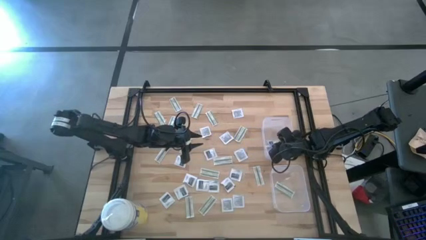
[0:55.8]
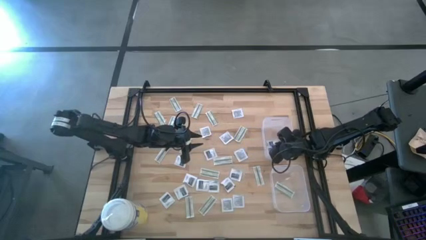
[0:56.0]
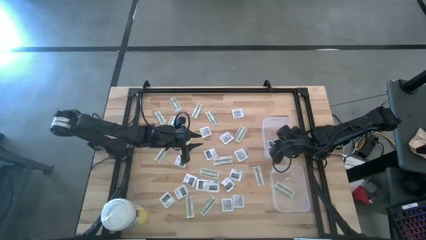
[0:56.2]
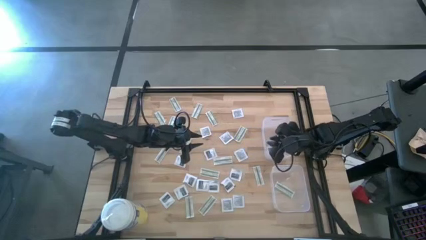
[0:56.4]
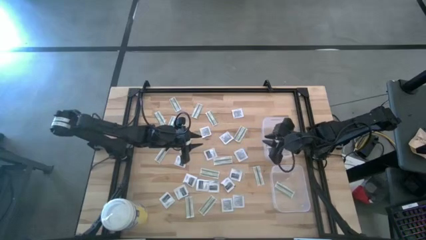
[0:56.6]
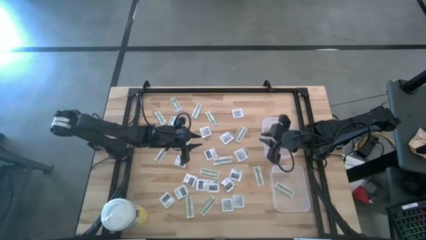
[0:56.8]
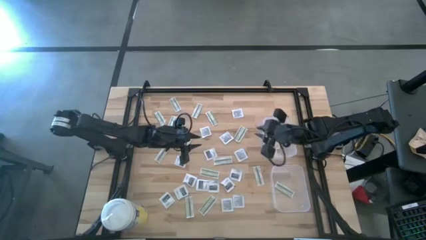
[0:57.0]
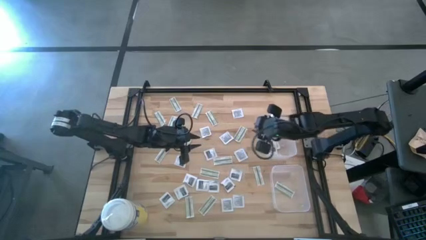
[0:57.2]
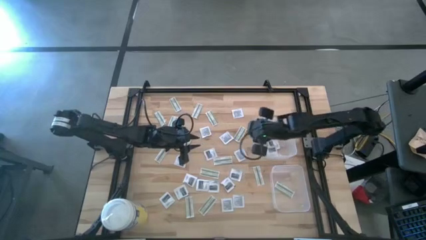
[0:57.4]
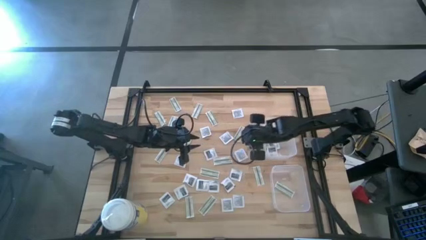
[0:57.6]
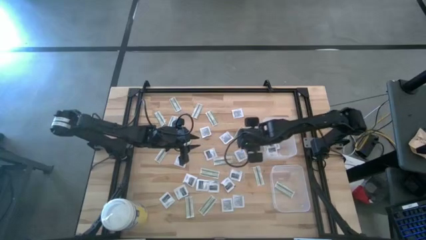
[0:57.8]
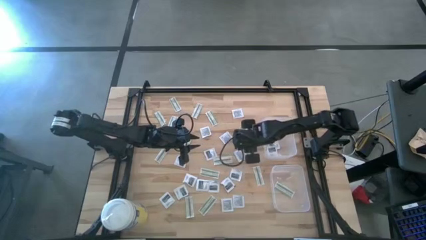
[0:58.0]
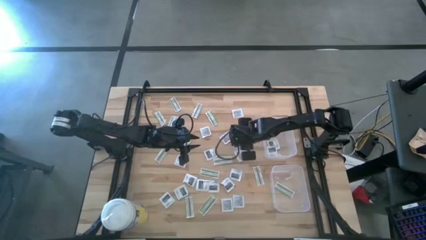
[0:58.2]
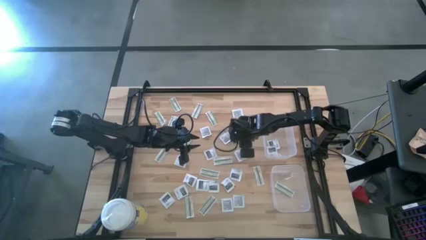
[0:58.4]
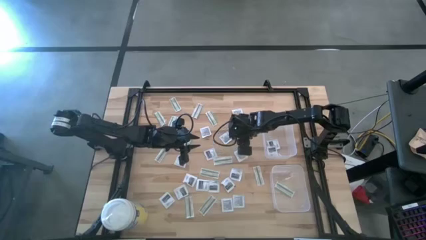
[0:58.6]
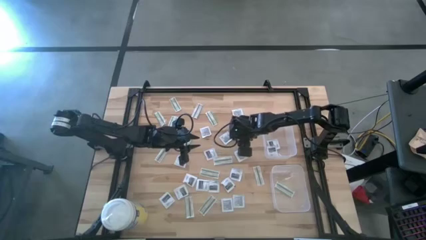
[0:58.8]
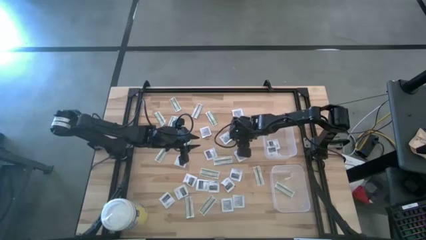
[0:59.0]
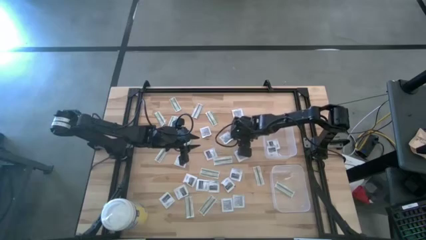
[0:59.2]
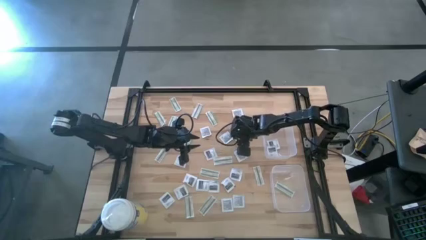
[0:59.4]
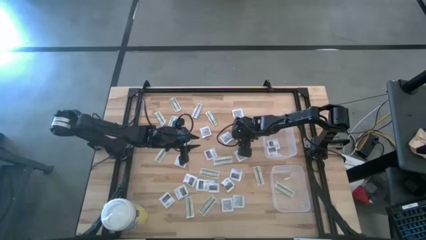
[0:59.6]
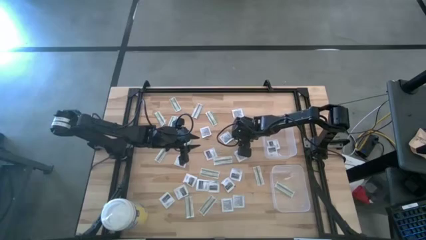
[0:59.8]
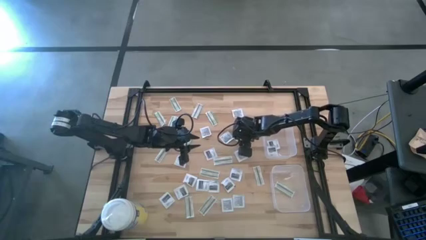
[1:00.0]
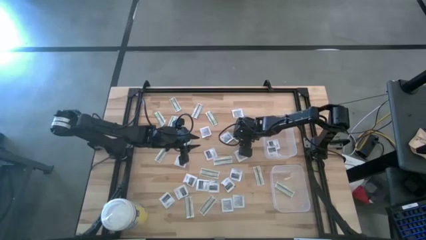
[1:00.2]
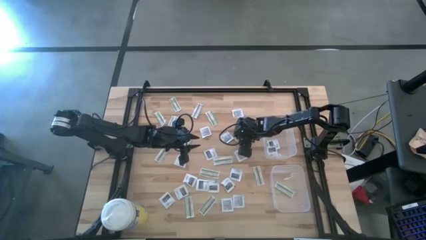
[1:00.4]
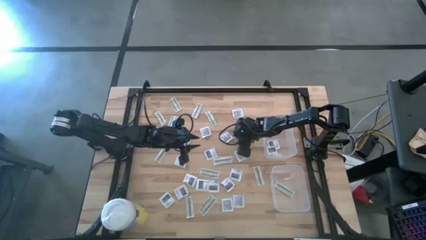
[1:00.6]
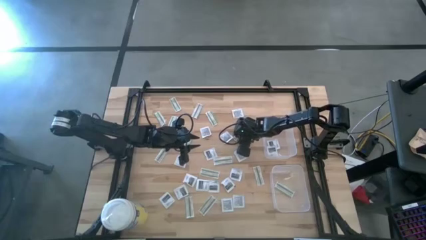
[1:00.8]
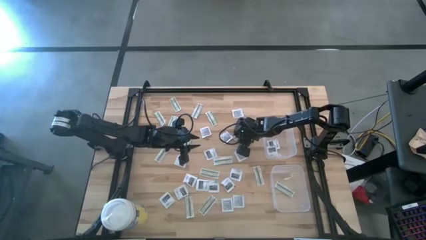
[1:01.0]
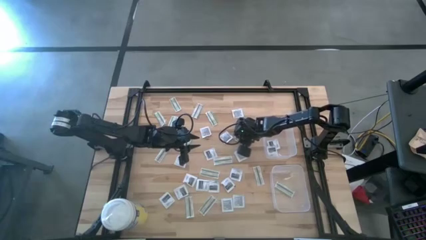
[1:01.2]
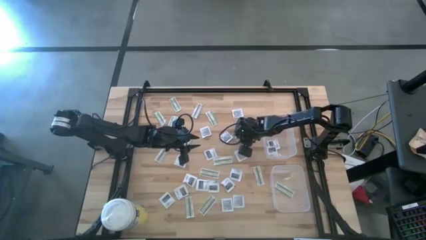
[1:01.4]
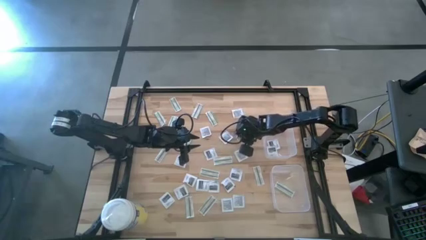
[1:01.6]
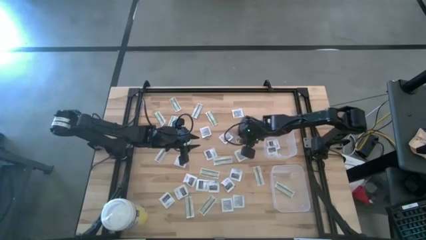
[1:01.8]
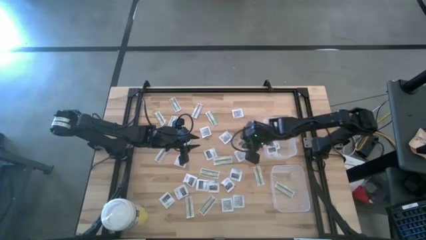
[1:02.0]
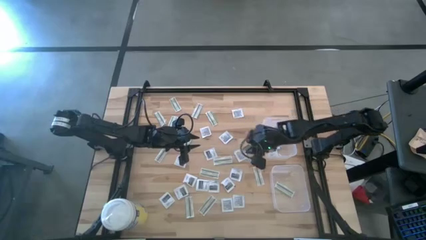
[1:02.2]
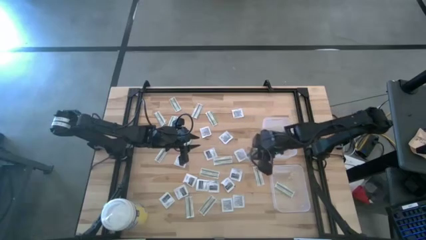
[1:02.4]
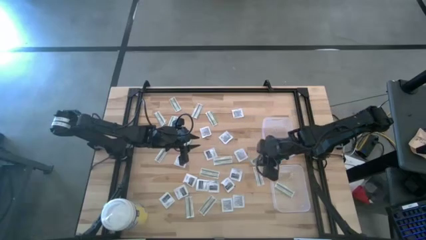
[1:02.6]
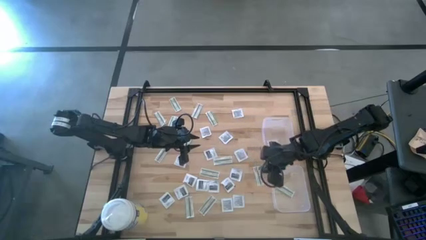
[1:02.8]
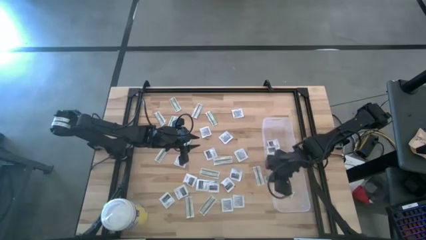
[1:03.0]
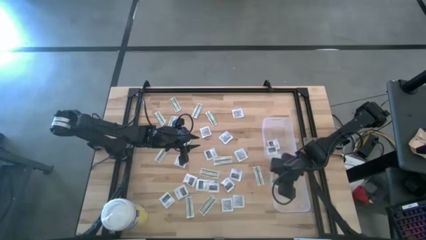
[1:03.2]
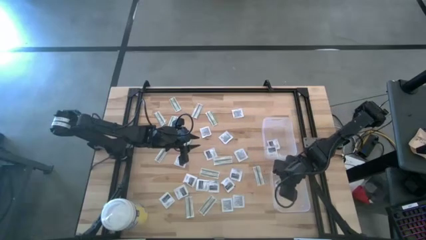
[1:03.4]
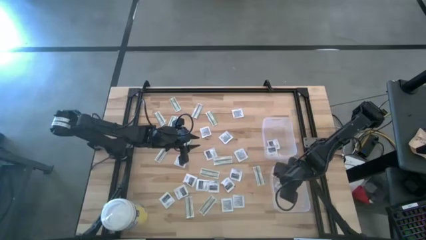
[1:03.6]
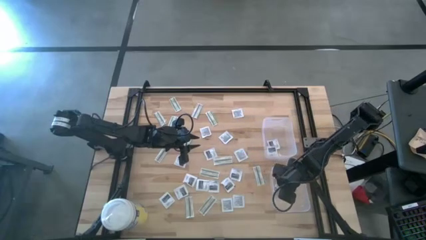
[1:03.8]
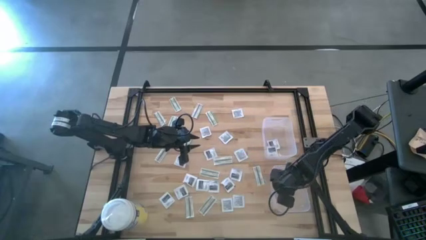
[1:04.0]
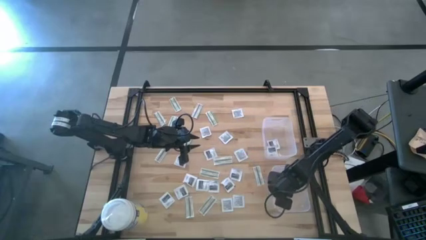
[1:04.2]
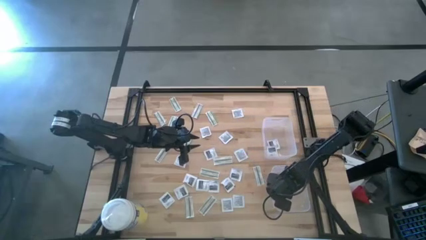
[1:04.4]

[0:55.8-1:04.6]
Task: Pick & Place First Aid Supplies
Put the bandage pack into the bottom bin

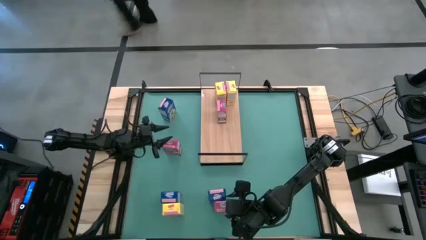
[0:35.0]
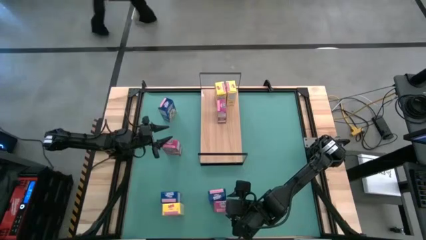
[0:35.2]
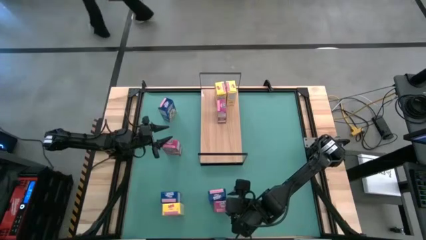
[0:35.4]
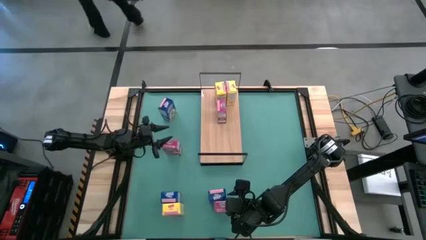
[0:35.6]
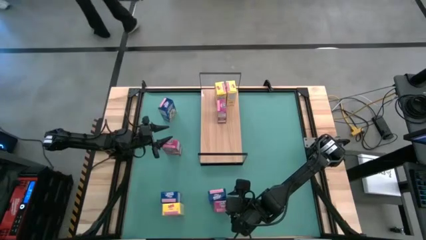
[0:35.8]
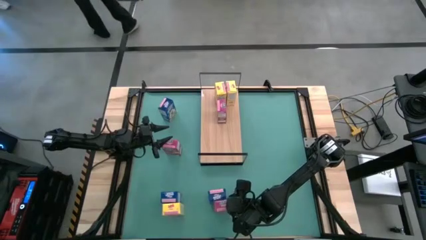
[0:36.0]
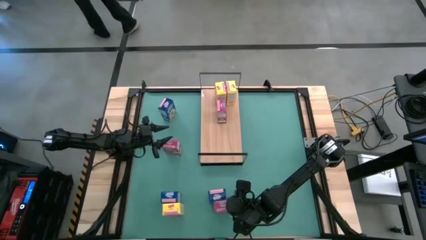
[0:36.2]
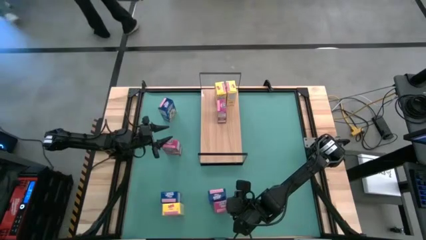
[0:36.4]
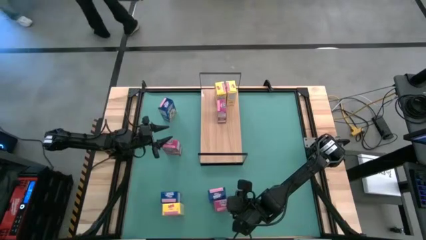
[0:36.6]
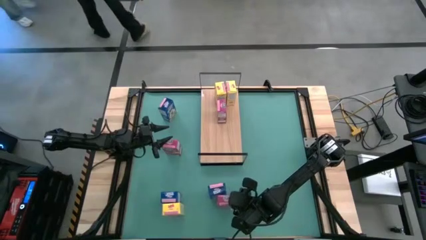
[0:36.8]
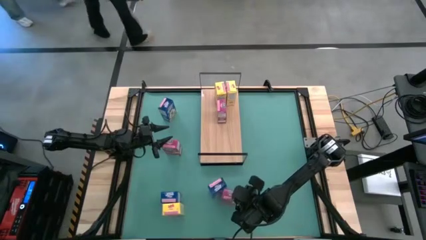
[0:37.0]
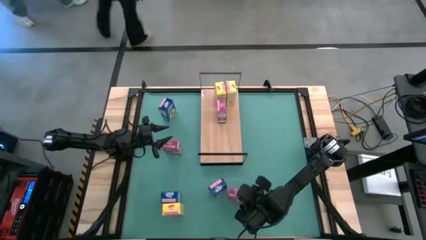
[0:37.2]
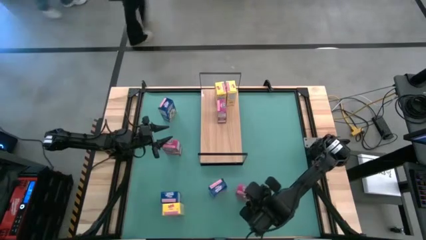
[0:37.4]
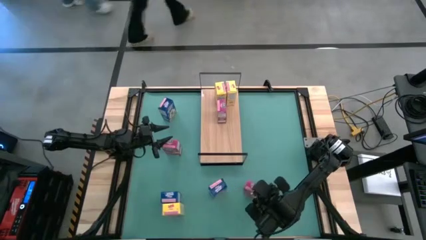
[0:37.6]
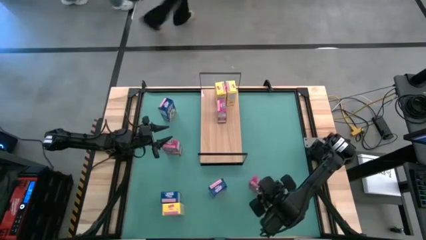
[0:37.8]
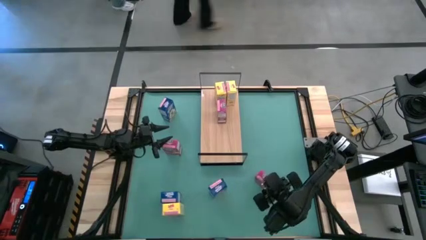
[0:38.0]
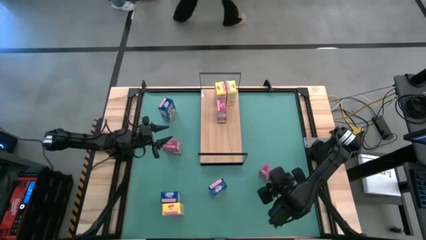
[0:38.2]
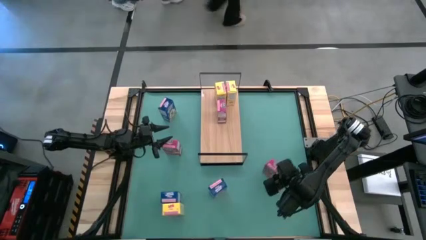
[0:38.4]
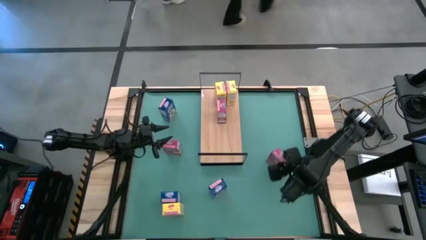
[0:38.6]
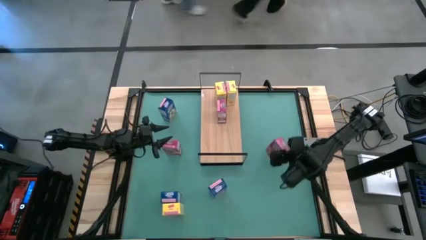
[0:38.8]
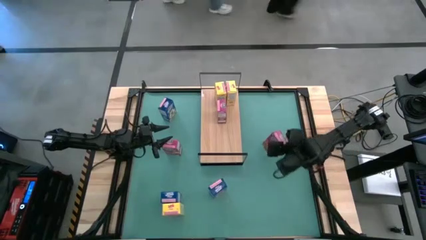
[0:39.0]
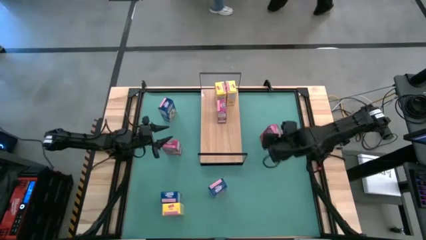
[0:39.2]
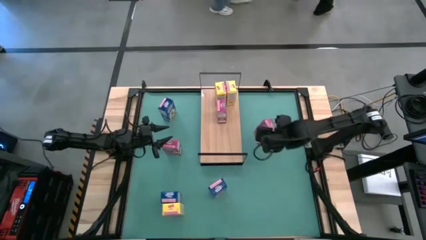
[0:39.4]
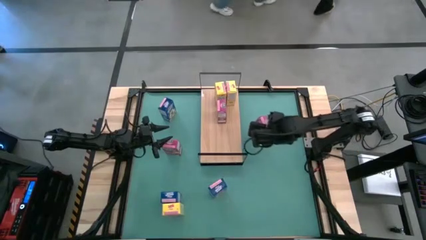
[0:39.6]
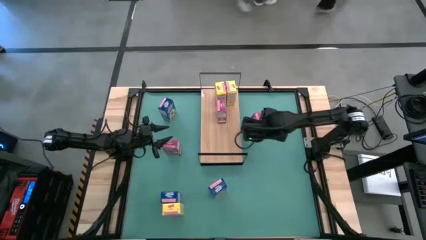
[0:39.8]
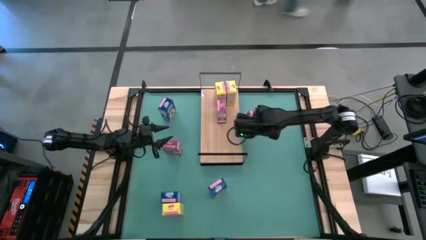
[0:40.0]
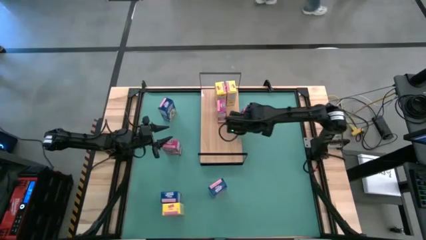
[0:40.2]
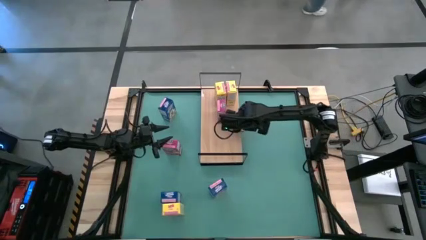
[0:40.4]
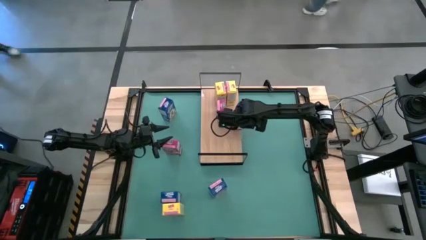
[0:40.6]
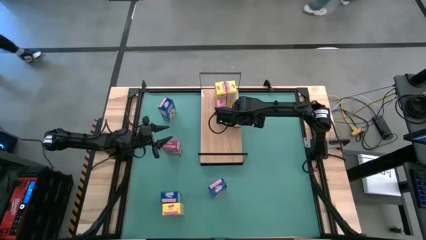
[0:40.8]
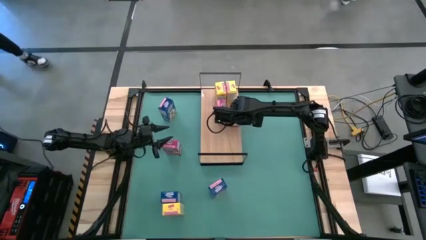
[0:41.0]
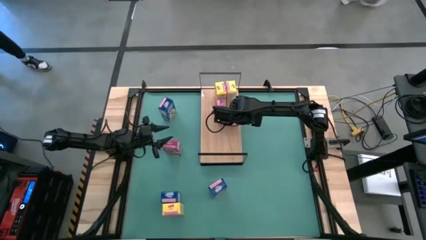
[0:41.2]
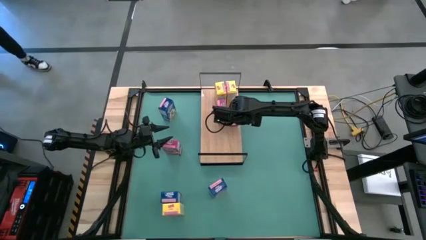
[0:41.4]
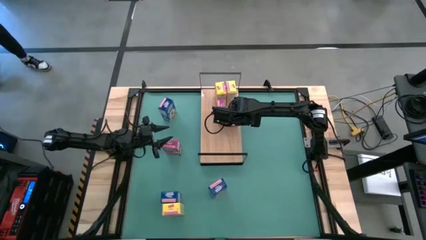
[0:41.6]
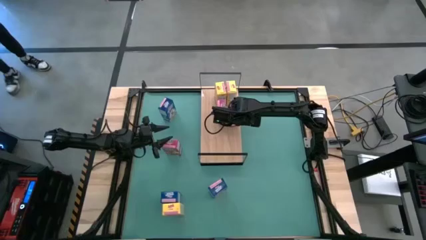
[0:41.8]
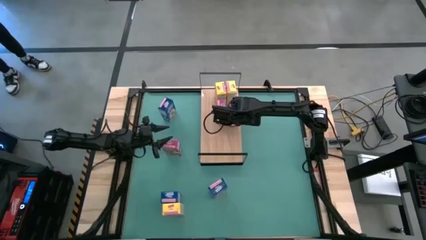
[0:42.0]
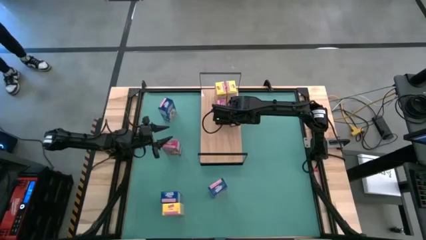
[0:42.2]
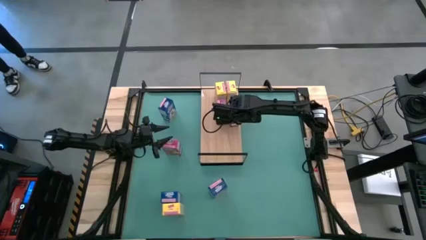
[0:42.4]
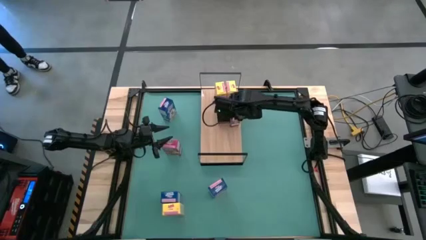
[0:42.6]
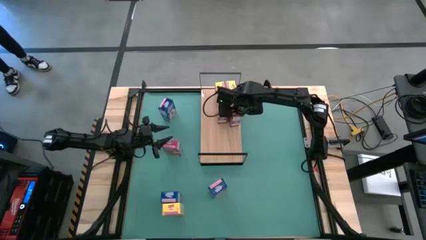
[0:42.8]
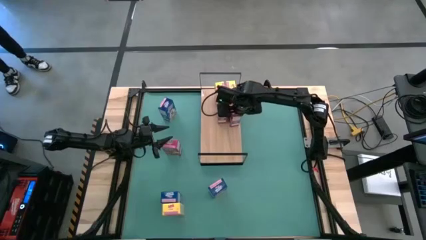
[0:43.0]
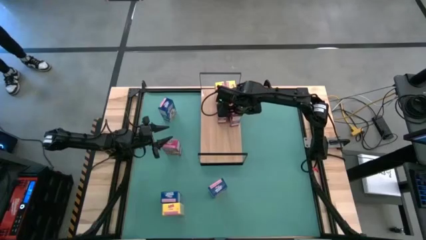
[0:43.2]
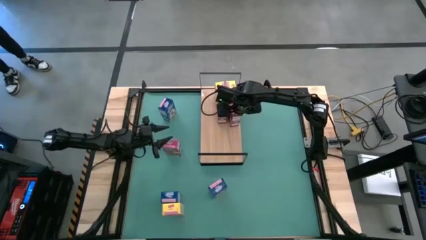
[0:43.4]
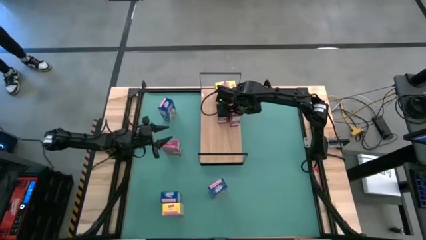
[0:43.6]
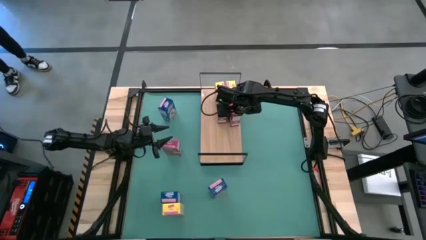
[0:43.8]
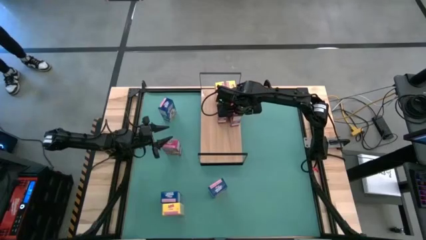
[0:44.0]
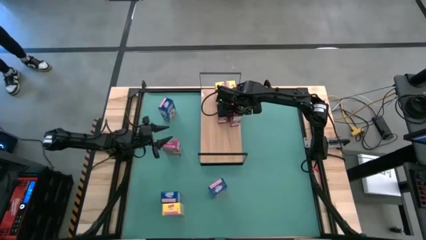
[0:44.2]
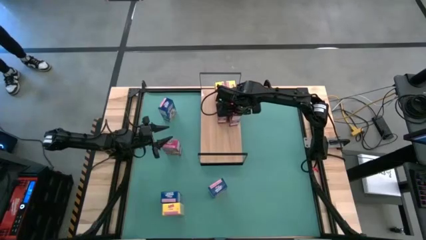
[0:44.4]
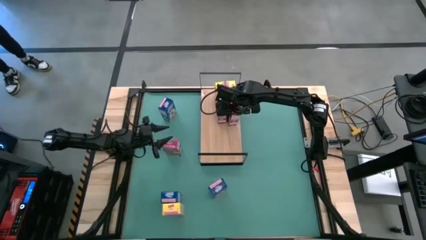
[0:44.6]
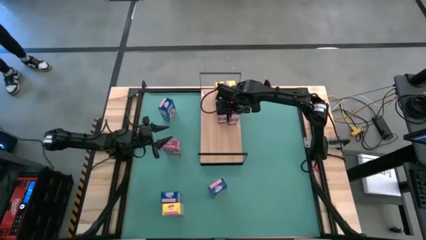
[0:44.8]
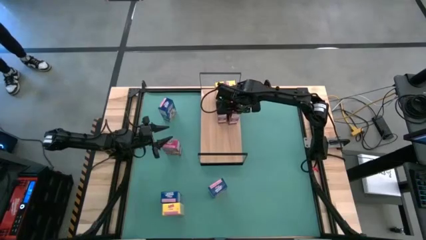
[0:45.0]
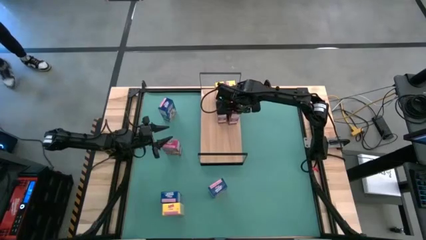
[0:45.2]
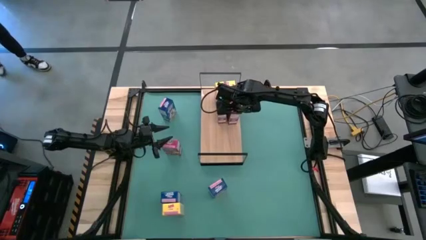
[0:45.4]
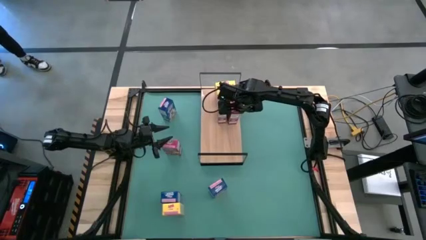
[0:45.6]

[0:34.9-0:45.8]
Task: Stack cereal on shelf
Put the bottom purple cereal box on the shelf aligned with the other purple cereal box
